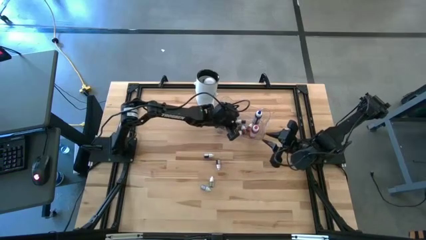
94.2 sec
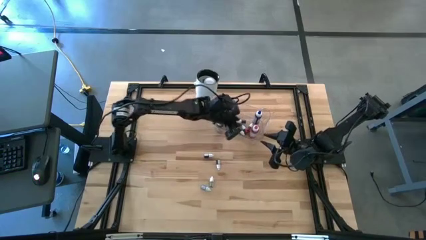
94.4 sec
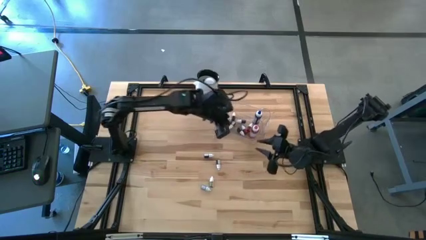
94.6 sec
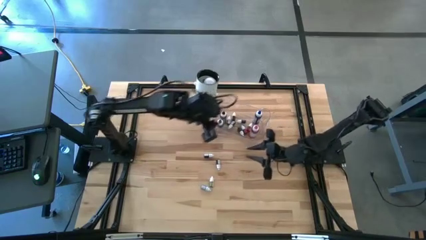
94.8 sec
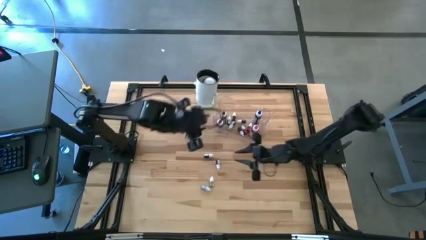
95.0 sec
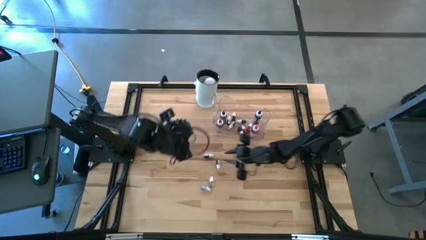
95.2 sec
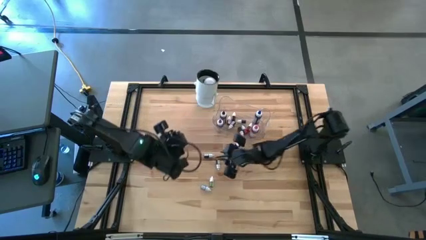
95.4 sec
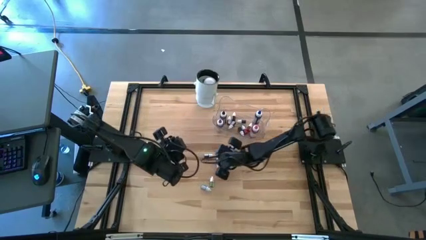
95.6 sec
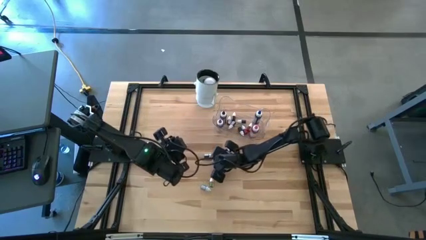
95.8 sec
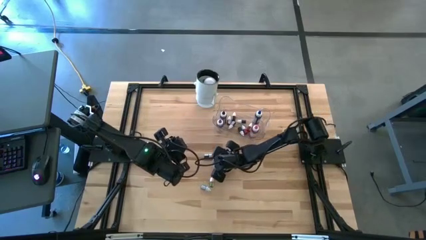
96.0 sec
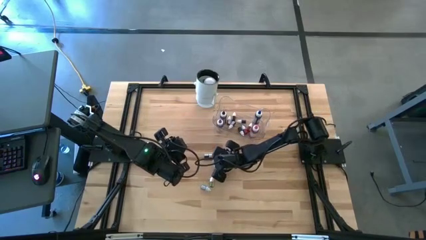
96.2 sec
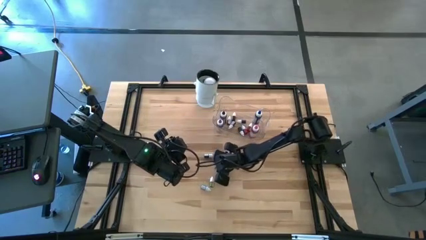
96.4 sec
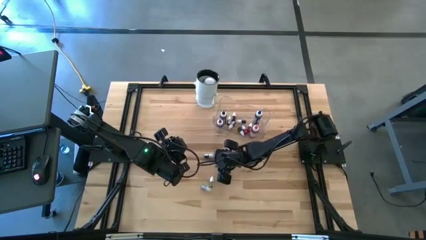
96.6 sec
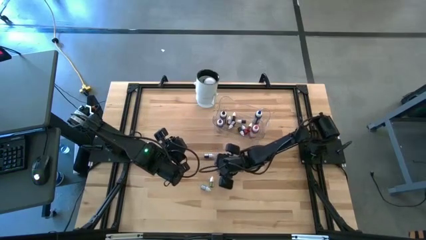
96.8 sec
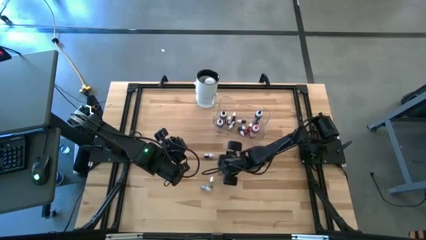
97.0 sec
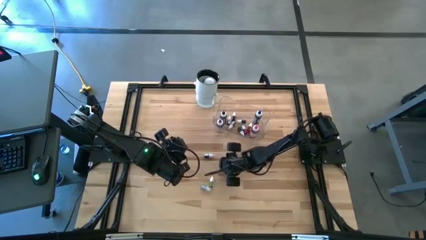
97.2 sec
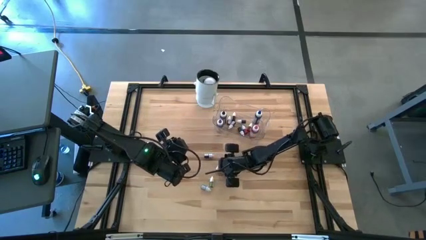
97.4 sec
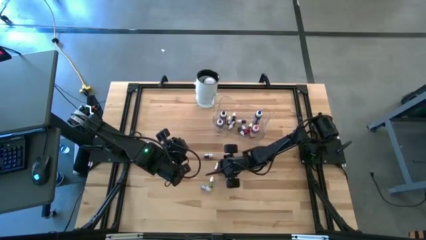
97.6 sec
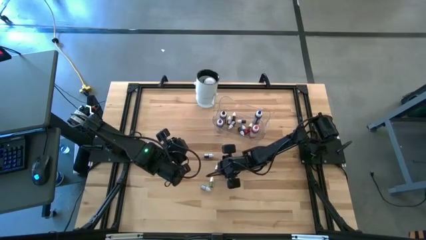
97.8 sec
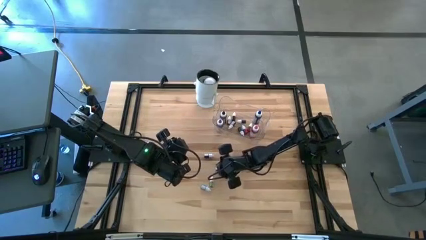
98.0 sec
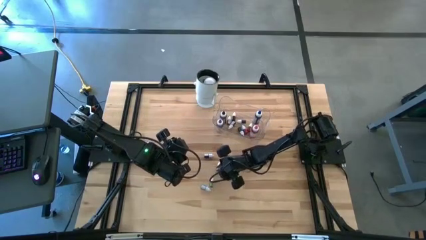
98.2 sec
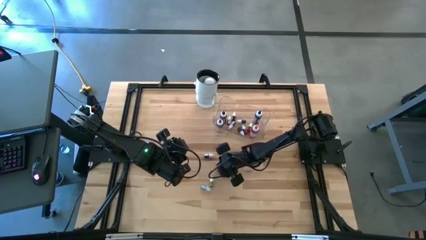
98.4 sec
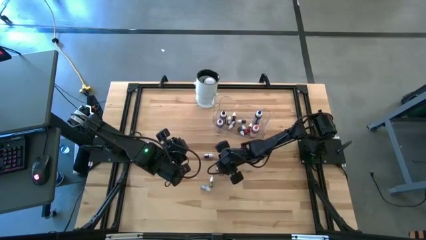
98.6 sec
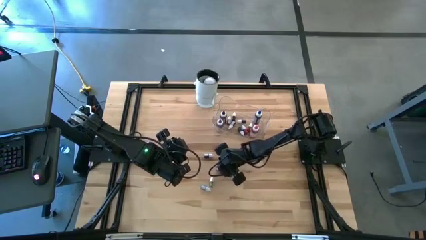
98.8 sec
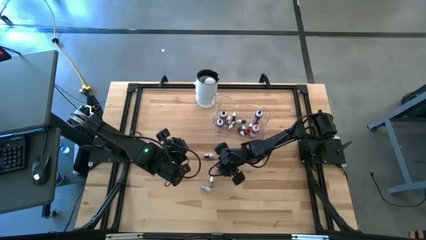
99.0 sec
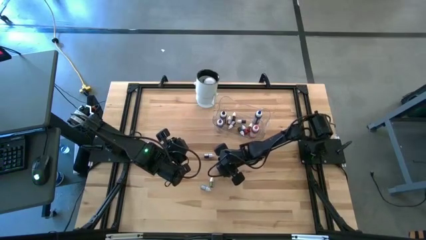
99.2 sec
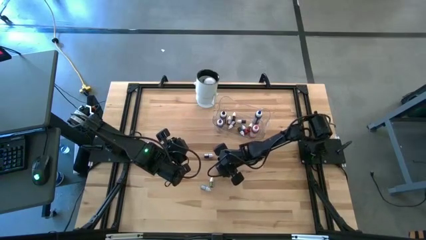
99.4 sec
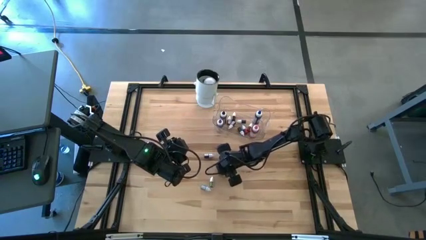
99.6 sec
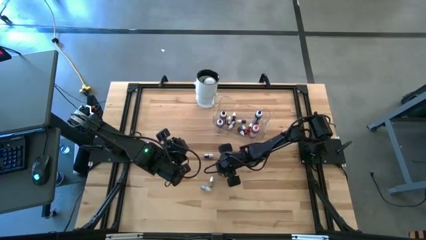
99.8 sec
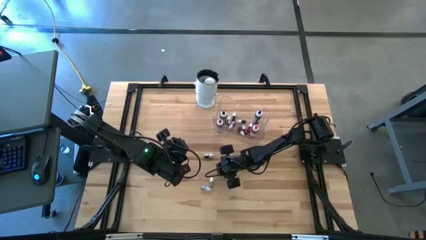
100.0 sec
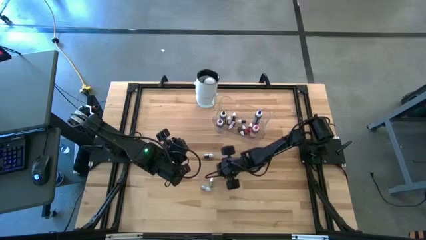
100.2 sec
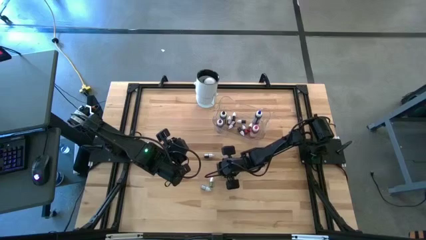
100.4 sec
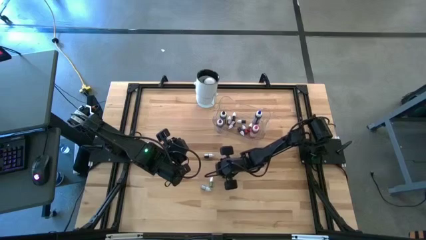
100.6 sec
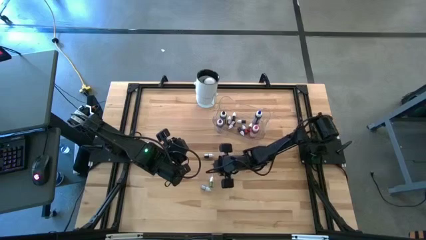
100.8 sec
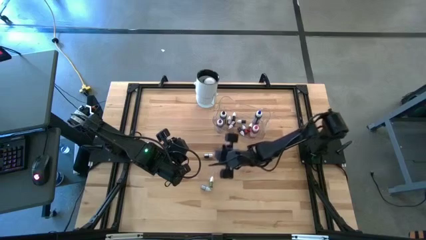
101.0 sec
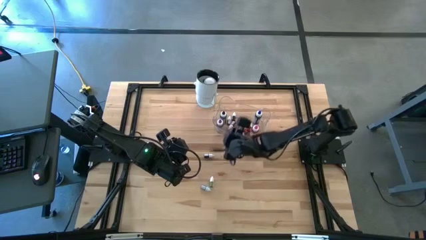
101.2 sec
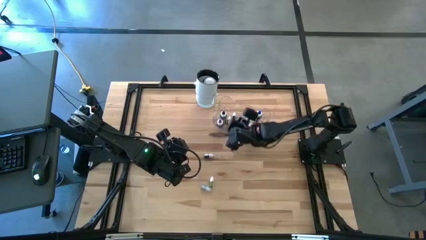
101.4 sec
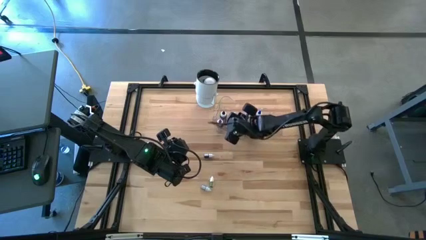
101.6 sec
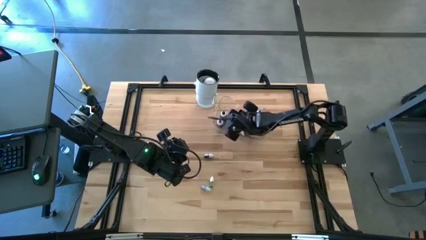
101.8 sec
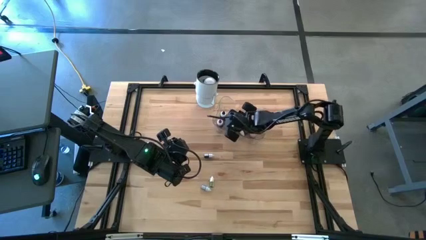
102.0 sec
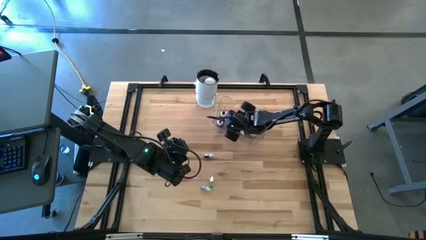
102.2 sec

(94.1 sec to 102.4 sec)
Task: Pick & Place food coloring
Put the small purple food coloring bottle into the transparent container

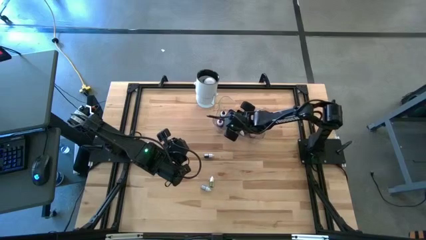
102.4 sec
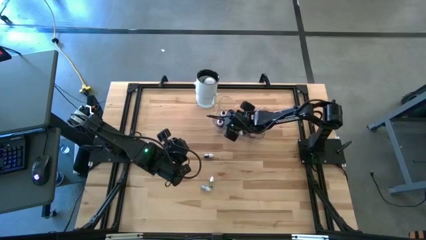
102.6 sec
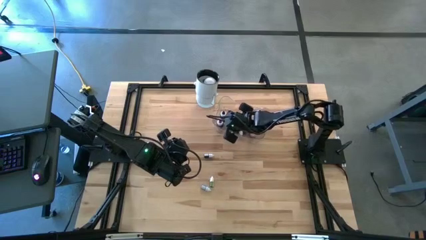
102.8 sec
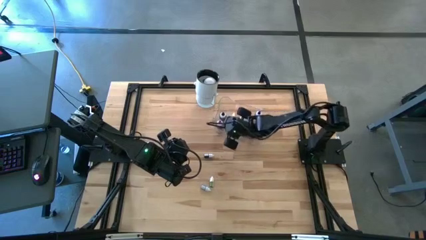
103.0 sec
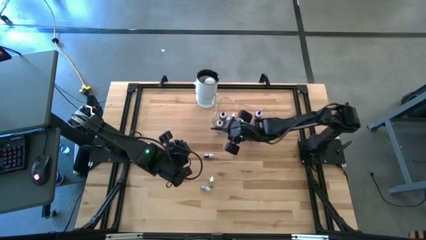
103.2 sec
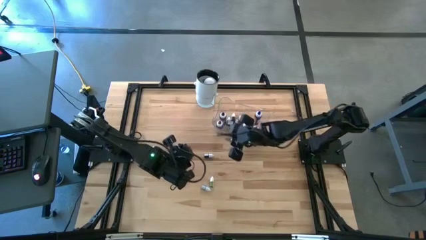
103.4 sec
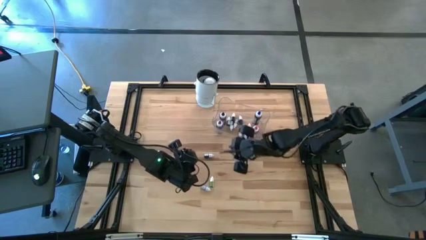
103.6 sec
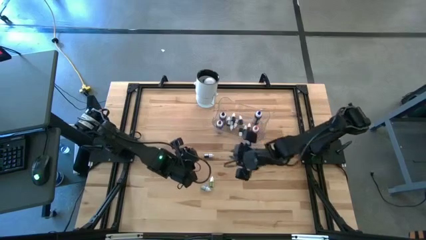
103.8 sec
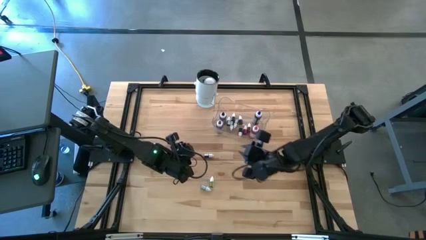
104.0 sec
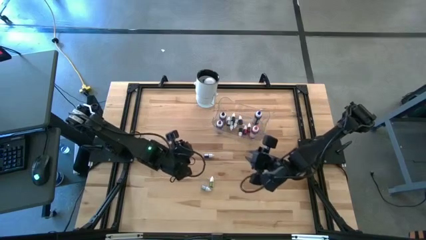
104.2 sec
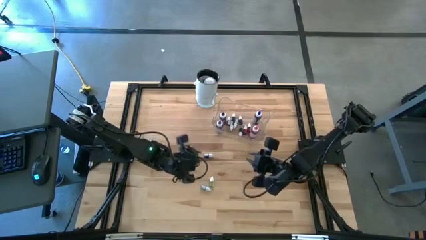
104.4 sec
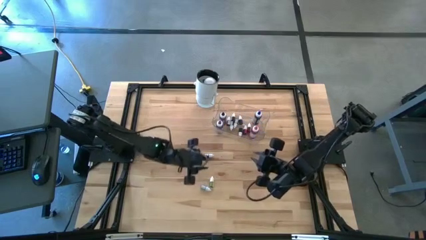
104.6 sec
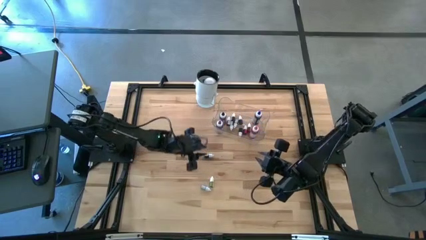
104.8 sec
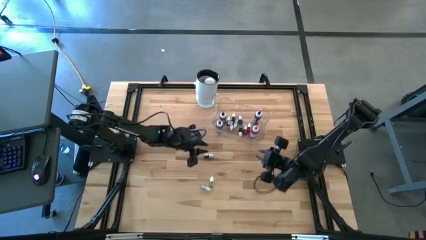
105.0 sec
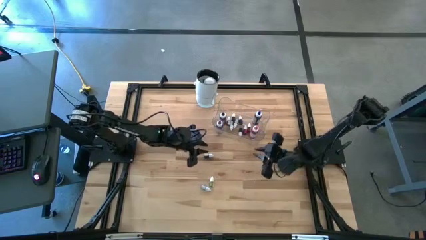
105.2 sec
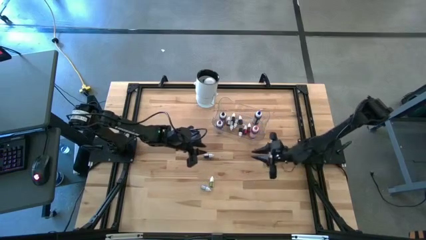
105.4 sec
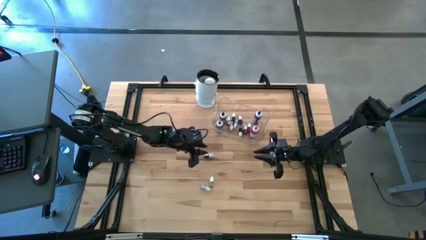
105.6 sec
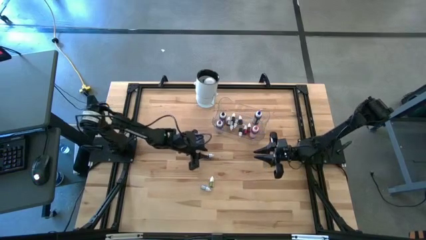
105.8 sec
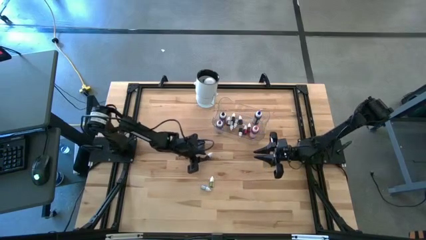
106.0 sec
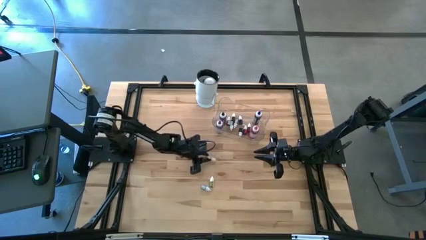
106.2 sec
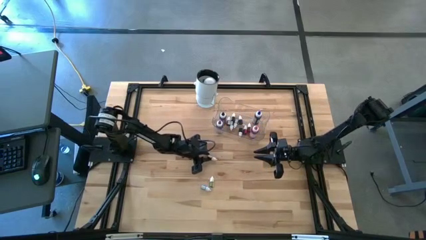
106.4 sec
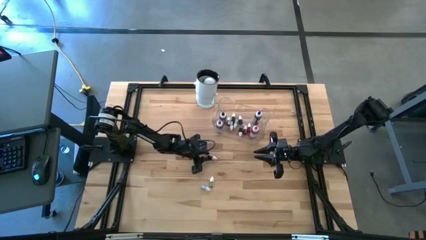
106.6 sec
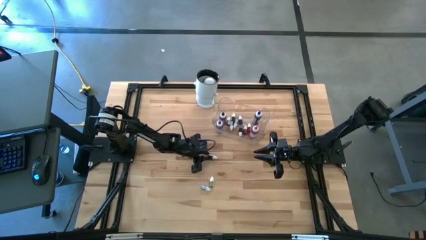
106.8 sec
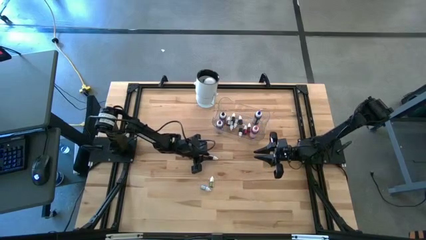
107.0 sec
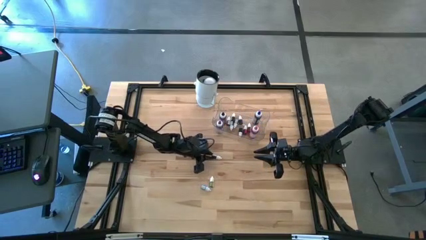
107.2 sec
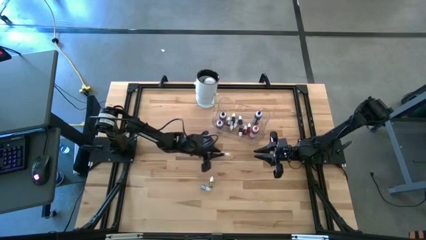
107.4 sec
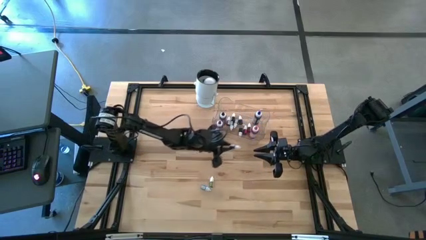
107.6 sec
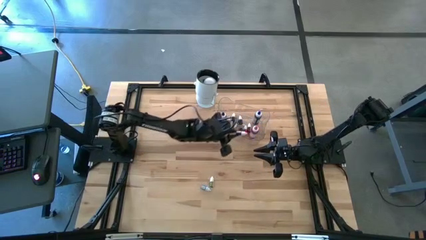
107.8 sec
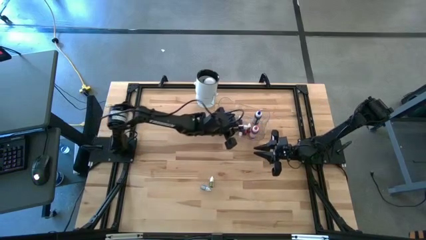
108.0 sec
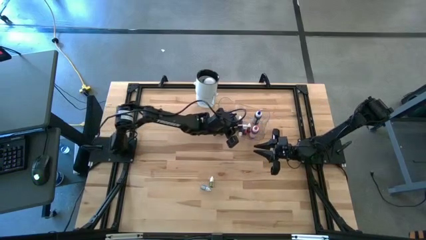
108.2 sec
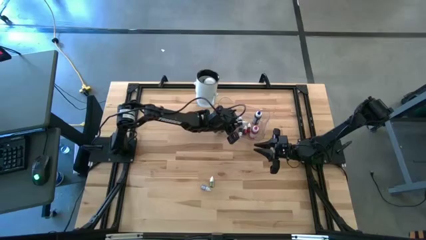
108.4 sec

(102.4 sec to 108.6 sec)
Put the small black food coloring bottle into the transparent container
